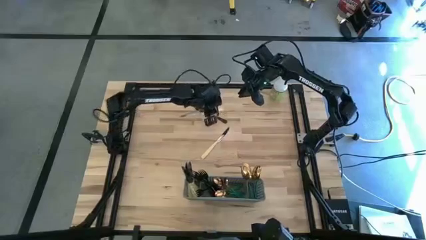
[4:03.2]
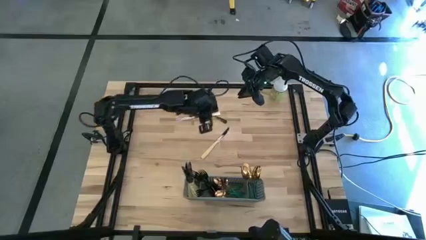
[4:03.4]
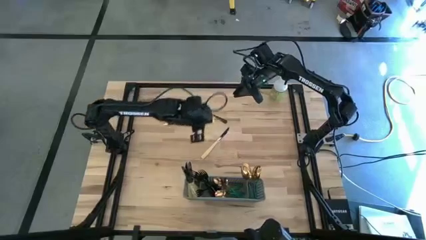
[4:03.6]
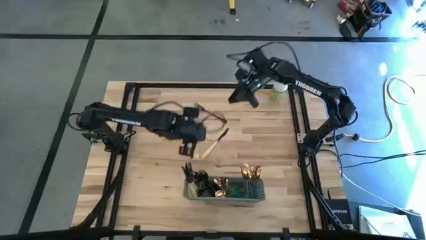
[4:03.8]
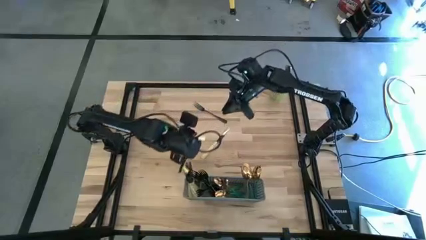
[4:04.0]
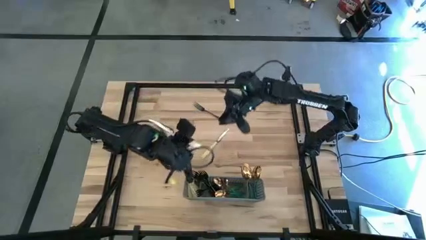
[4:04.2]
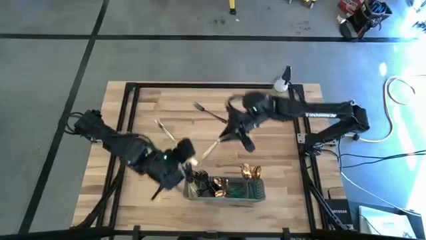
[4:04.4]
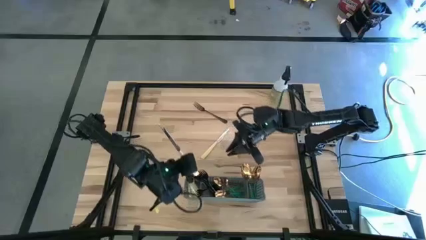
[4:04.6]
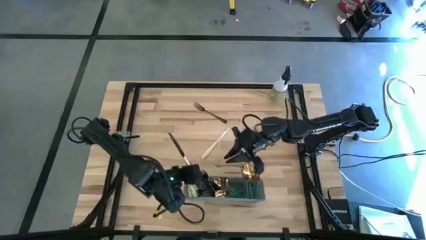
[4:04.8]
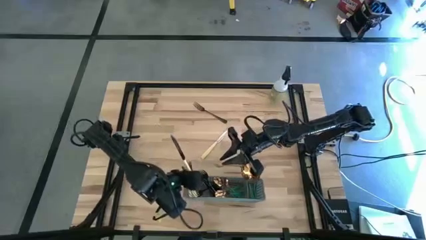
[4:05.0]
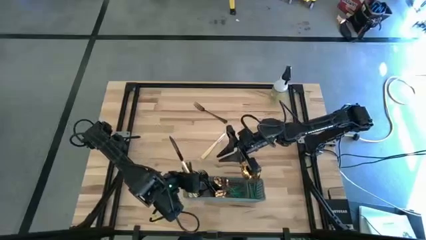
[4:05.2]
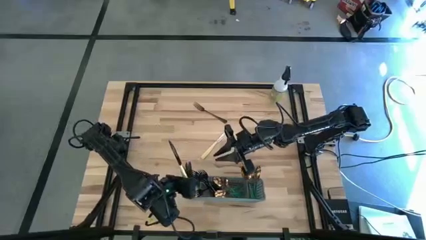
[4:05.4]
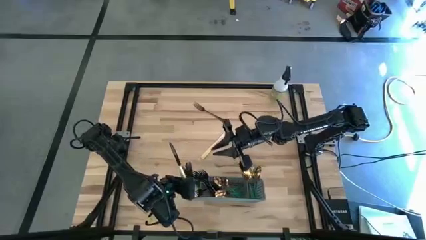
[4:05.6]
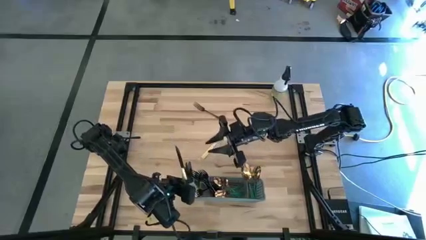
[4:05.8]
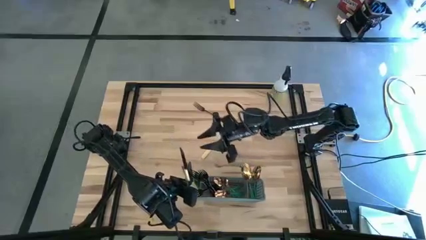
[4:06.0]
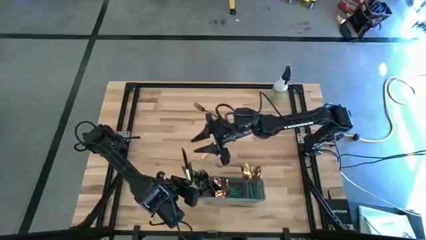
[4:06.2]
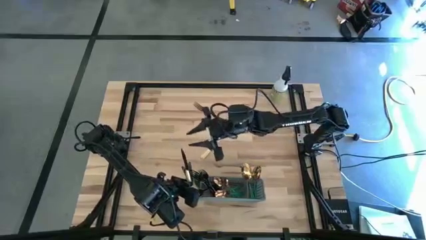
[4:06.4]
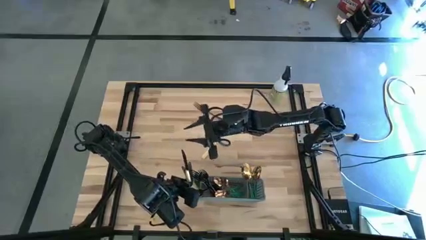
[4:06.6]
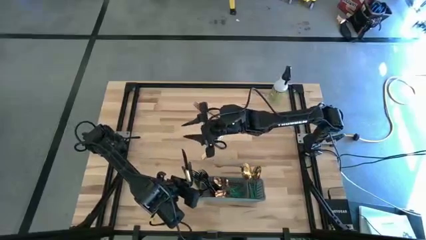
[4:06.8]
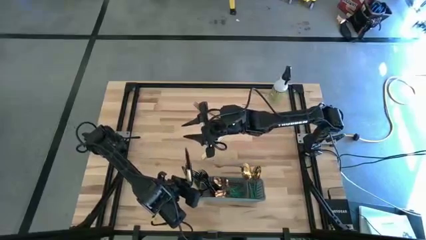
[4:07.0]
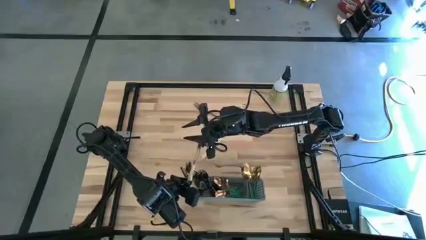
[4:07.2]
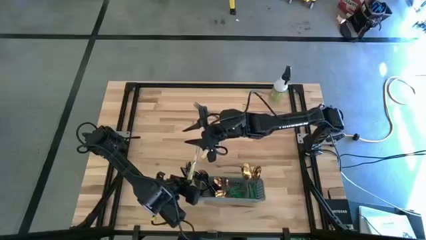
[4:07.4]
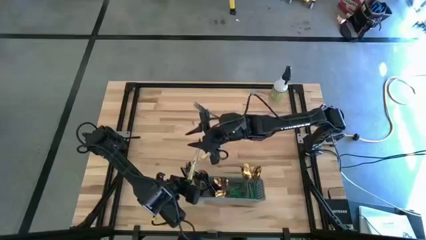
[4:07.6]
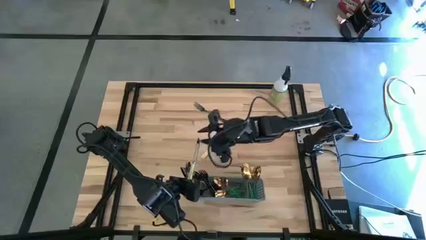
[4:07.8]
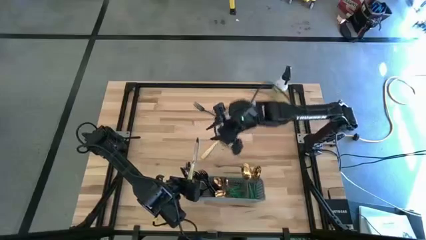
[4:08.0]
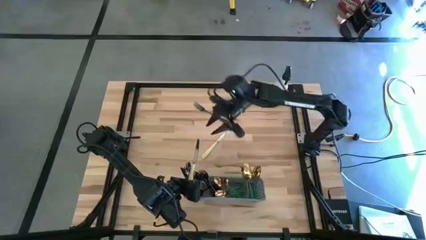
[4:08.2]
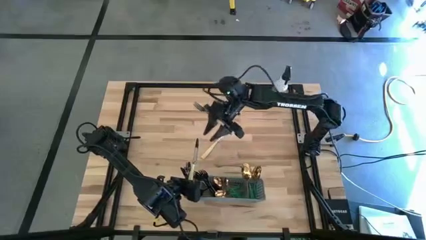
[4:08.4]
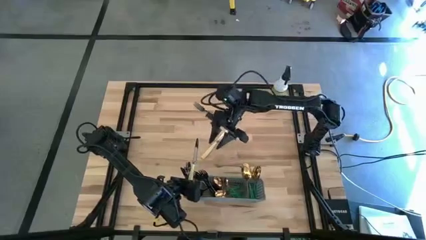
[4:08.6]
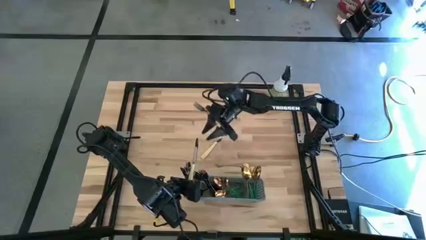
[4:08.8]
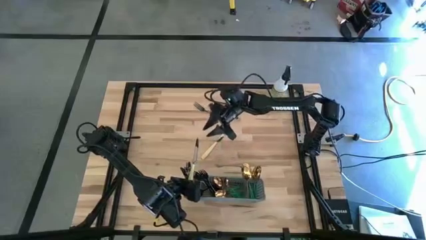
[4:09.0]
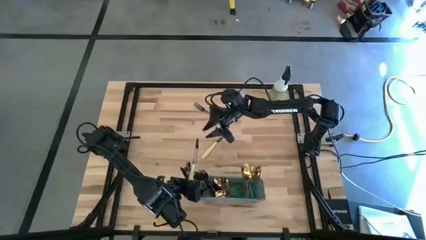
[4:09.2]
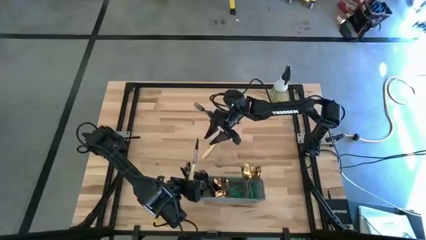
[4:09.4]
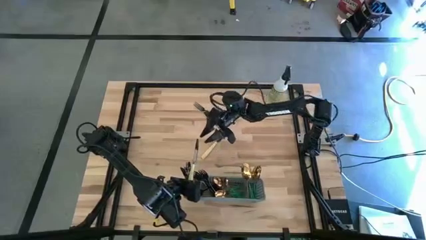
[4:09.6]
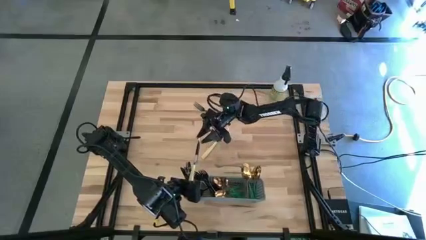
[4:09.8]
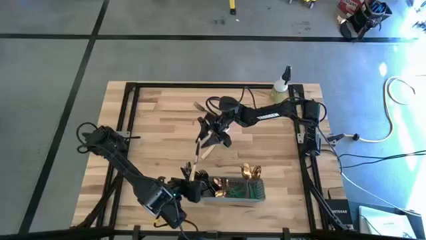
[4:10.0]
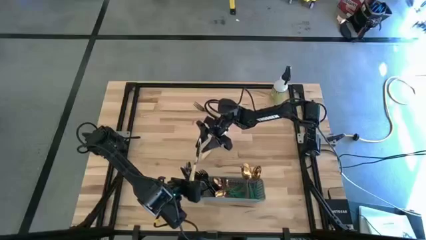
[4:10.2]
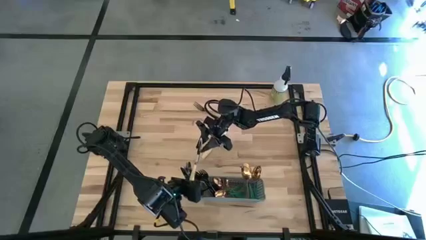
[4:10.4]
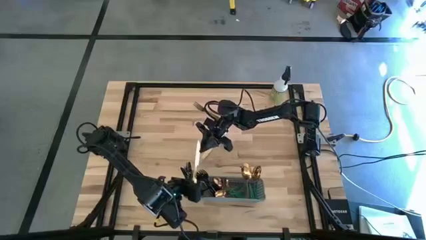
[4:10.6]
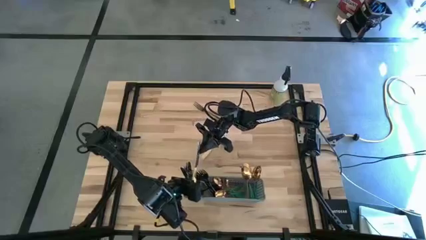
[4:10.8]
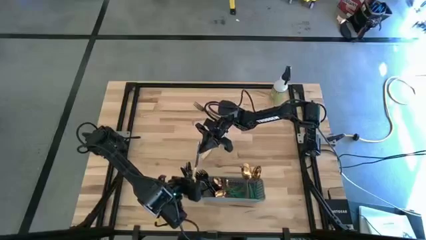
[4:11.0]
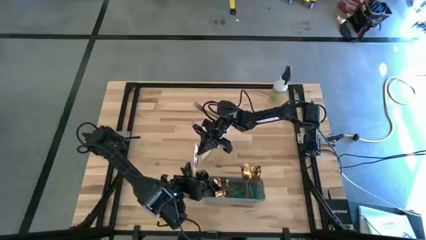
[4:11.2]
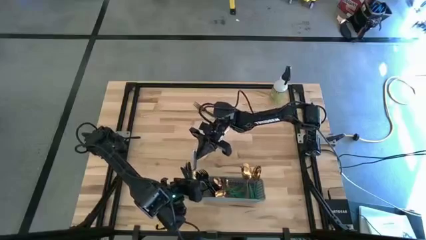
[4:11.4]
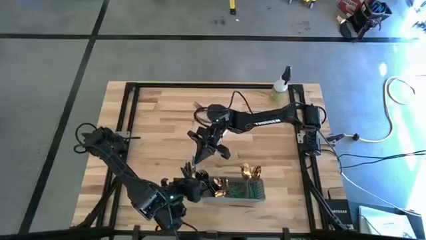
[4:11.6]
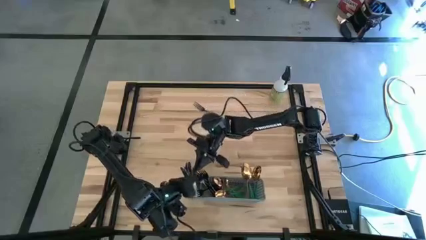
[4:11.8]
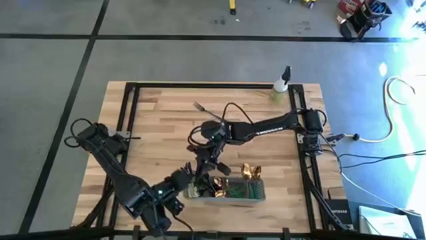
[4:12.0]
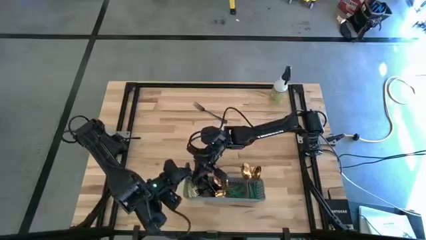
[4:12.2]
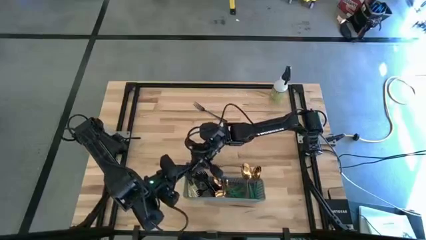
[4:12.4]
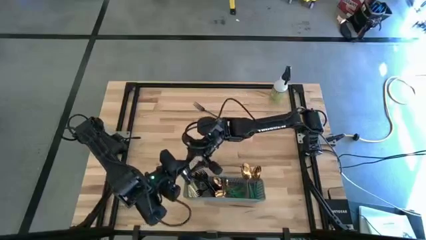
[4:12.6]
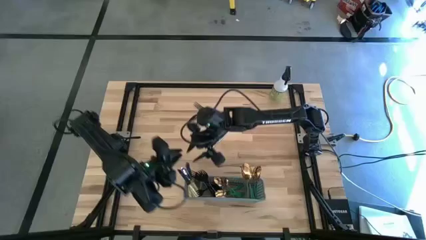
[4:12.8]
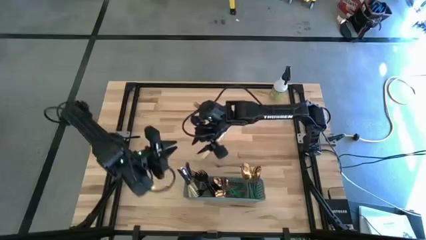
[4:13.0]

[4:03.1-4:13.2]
Task: Sort silverware
Put the top yellow knife into the gray cutlery rack

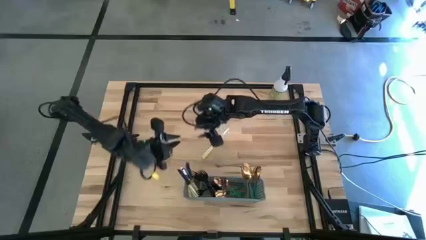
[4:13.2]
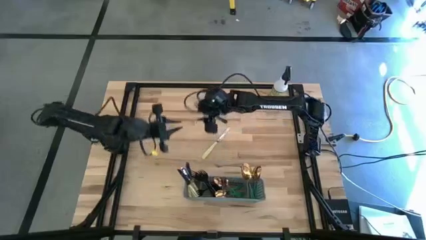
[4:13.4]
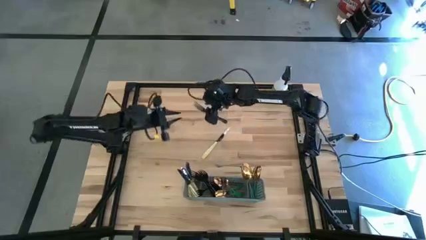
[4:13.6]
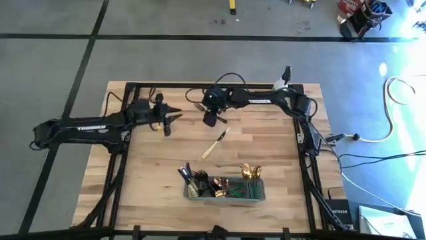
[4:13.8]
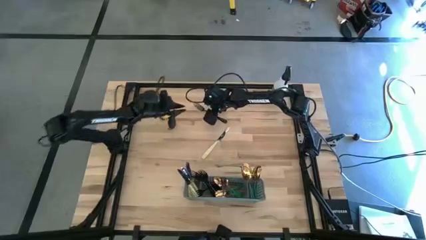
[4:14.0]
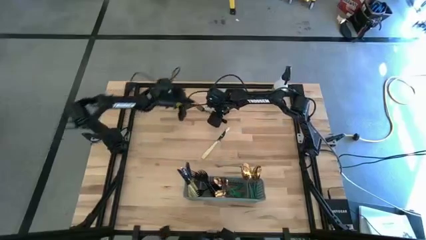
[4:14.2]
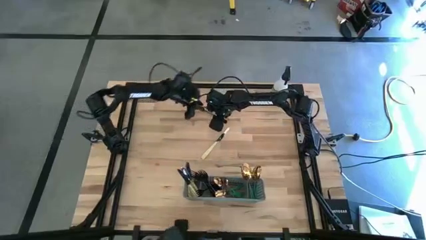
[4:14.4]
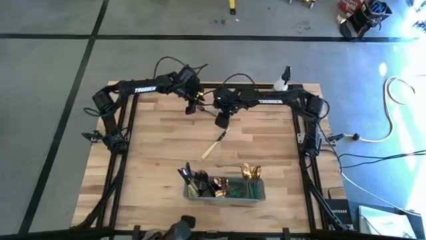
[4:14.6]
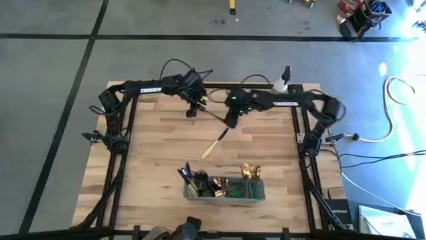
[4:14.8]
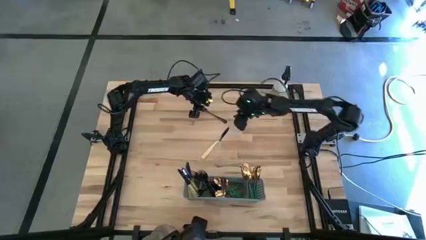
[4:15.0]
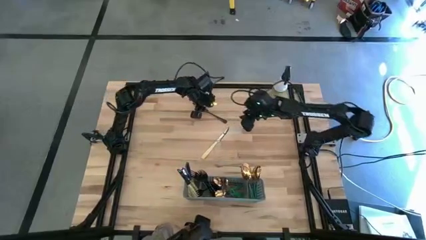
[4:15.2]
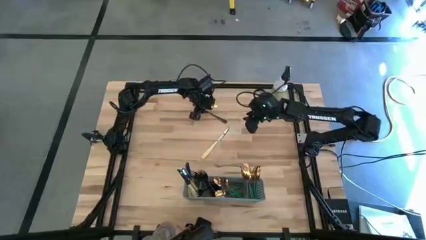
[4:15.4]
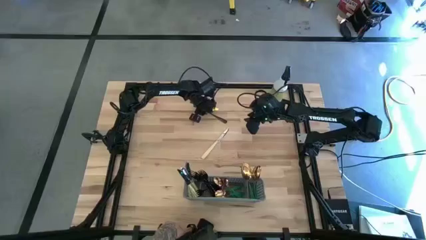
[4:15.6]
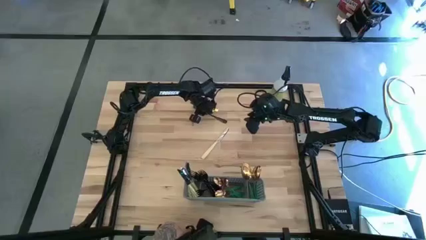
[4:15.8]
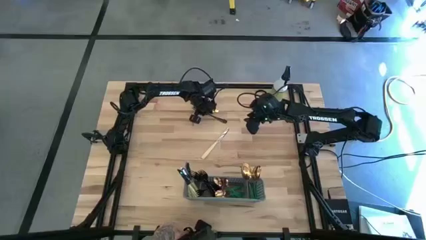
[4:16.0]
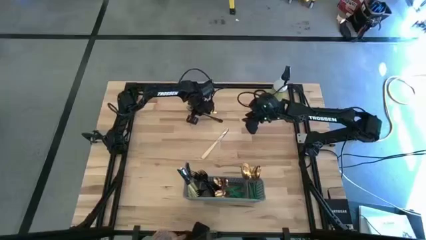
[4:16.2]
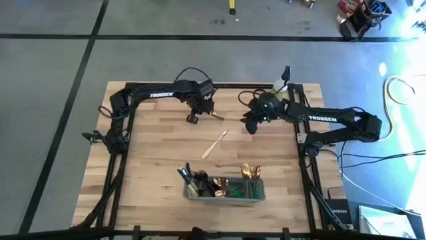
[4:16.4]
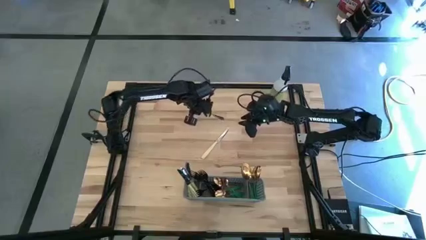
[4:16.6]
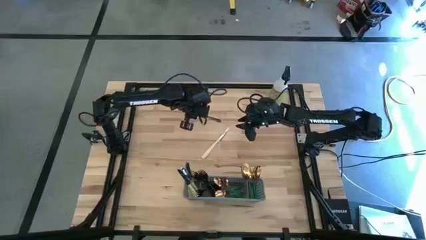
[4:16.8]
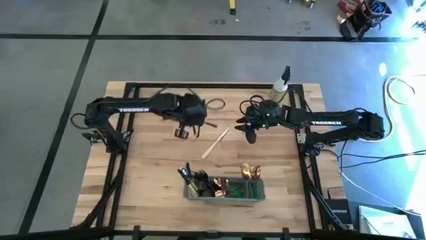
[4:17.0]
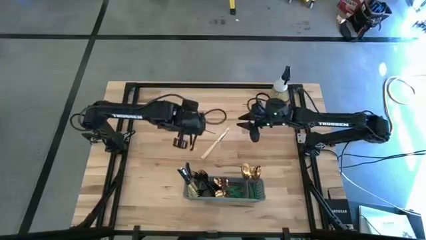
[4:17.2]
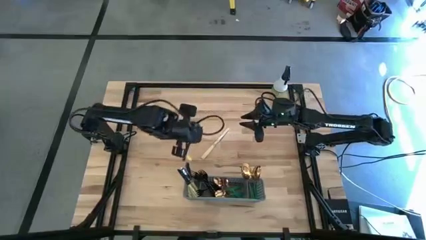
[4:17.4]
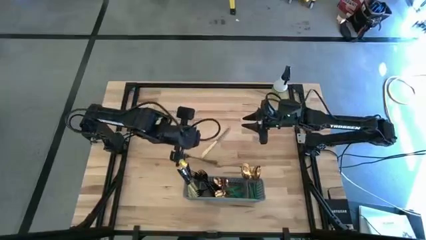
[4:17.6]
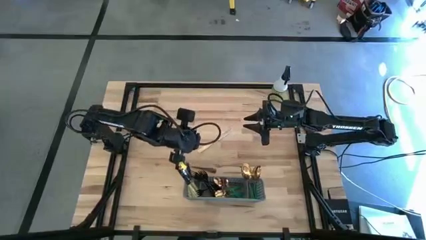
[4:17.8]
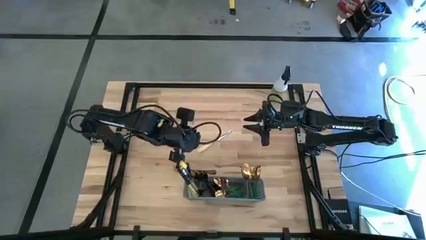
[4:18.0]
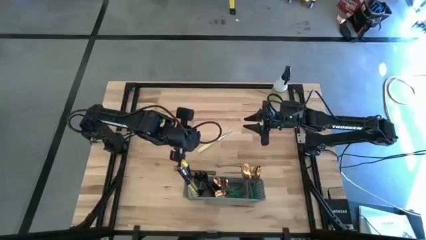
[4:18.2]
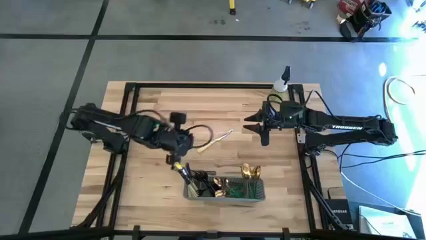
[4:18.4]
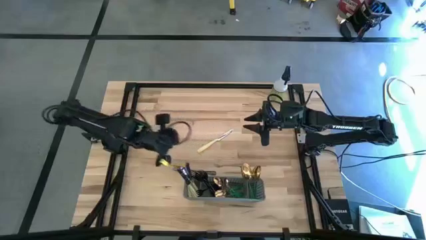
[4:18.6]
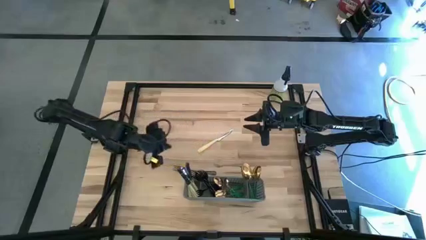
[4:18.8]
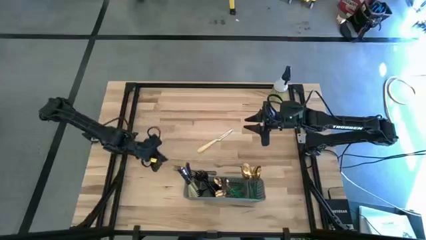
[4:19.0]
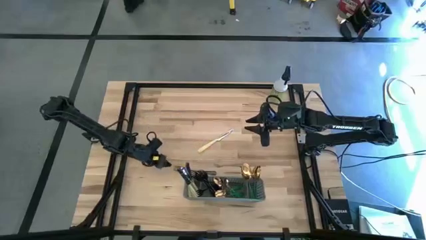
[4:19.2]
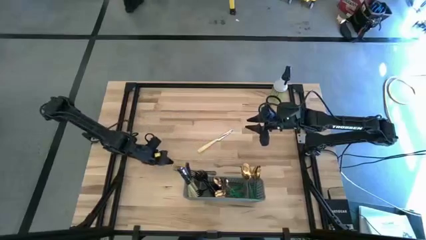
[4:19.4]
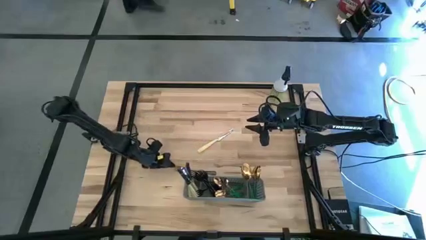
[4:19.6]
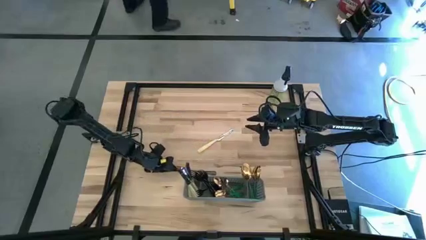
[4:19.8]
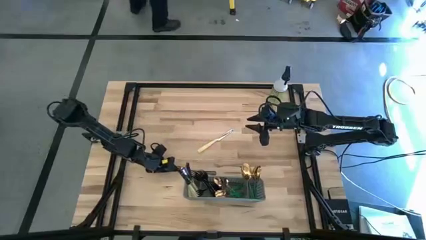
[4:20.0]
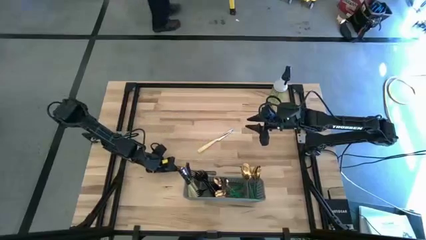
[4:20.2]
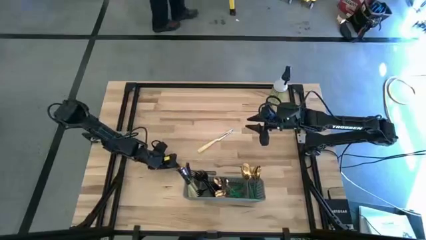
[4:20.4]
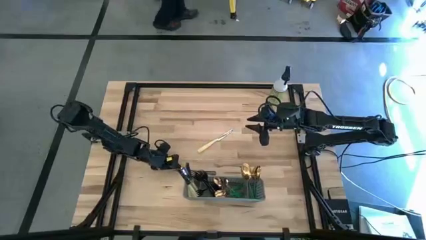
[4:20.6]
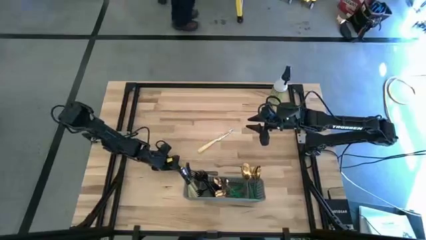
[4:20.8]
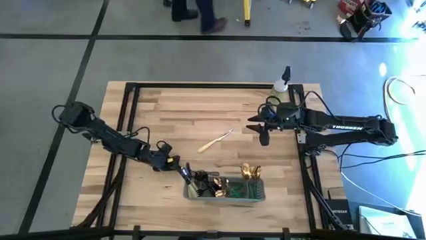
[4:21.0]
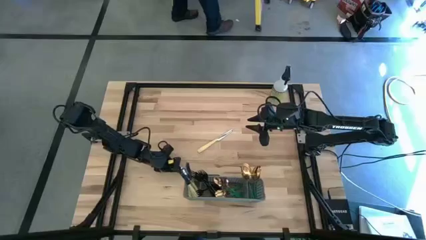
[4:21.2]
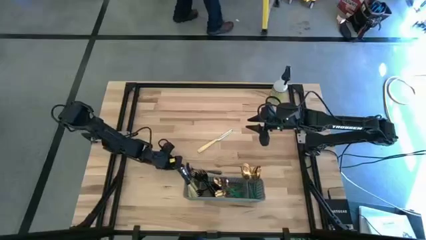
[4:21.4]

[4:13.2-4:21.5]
Put the black fork into the gray cutlery rack
